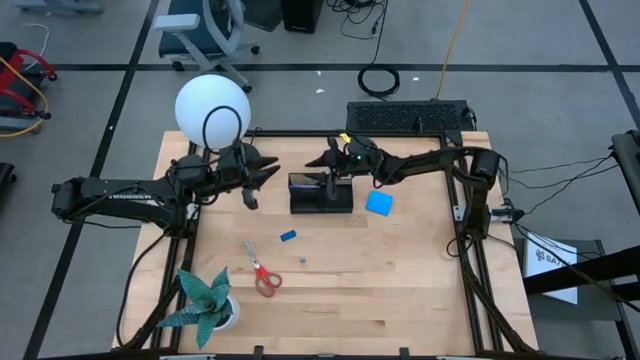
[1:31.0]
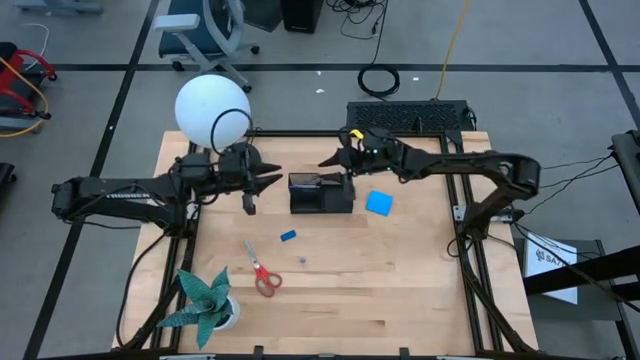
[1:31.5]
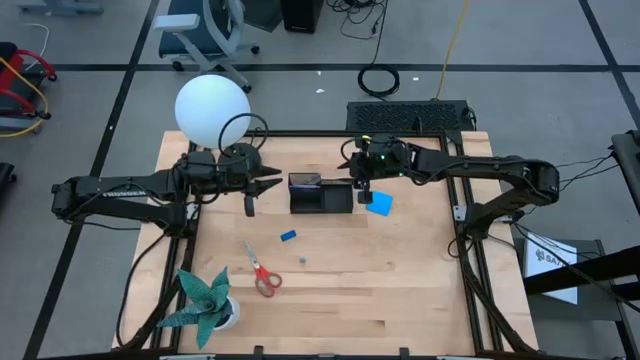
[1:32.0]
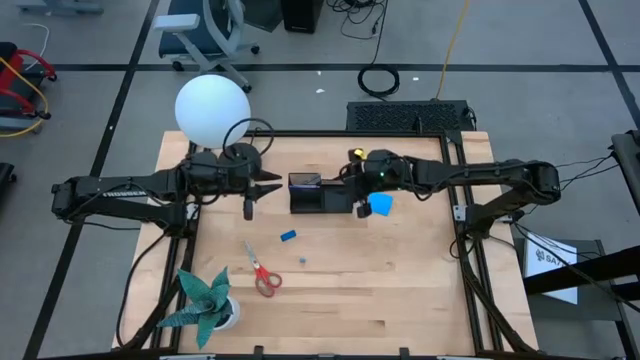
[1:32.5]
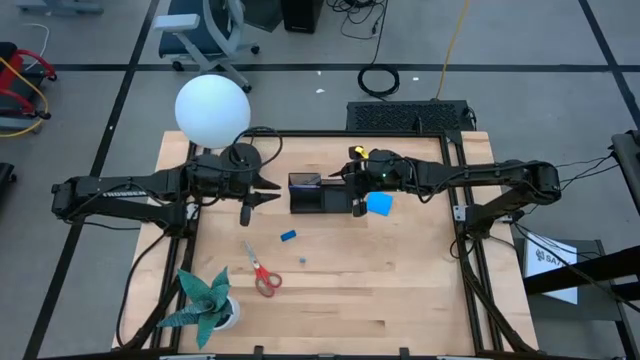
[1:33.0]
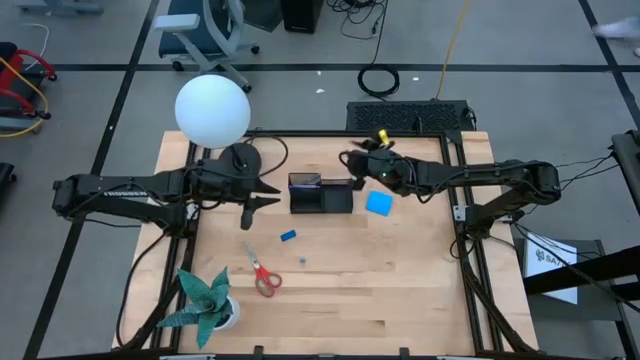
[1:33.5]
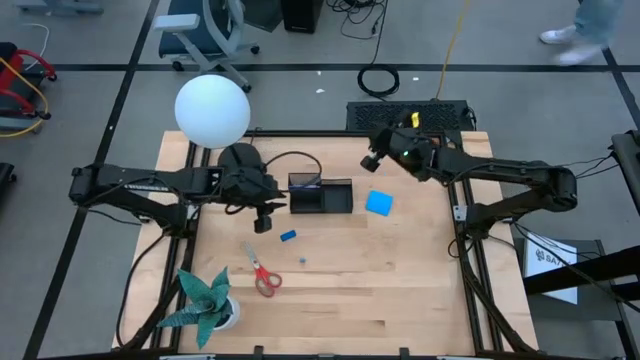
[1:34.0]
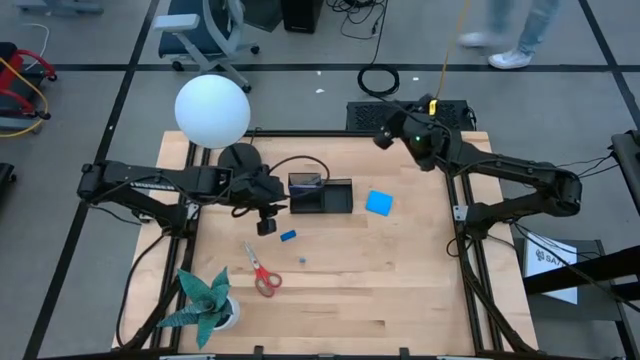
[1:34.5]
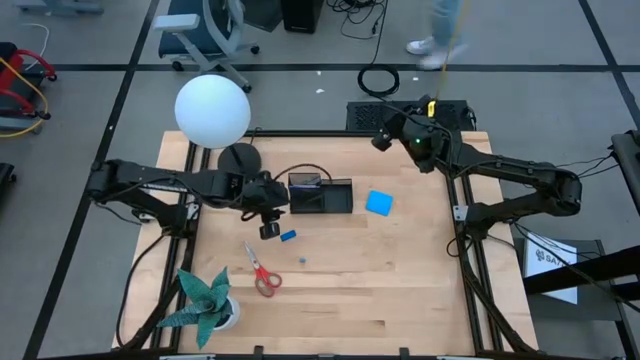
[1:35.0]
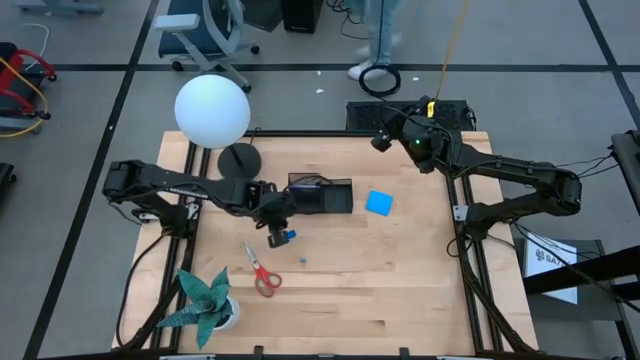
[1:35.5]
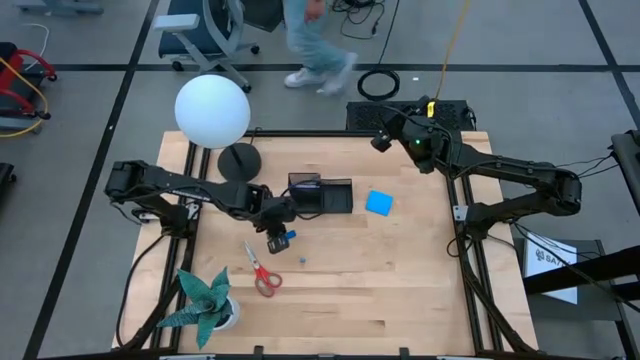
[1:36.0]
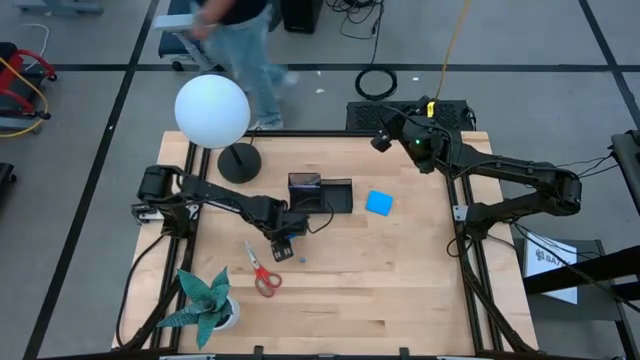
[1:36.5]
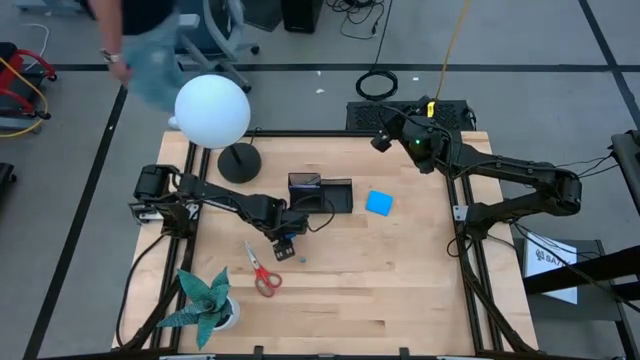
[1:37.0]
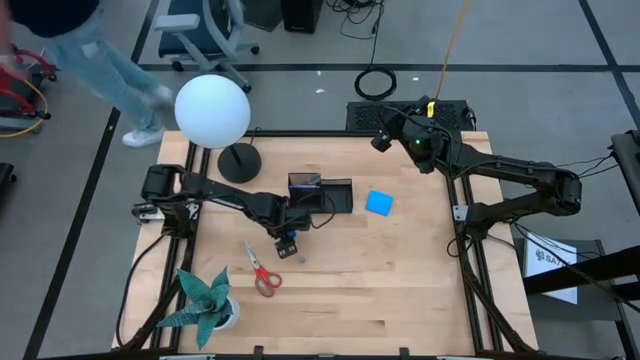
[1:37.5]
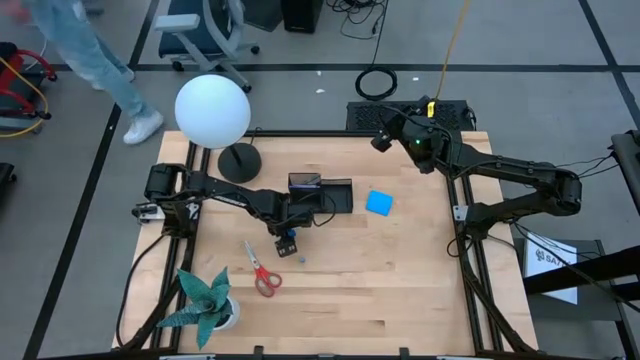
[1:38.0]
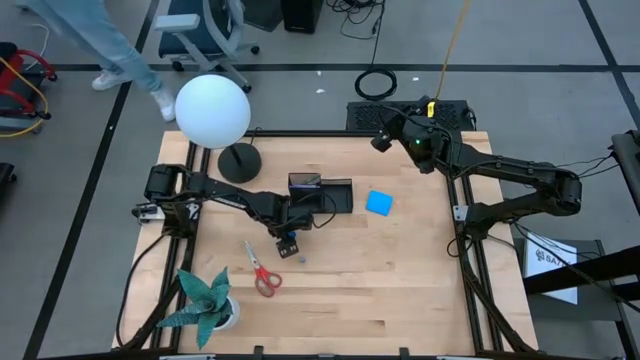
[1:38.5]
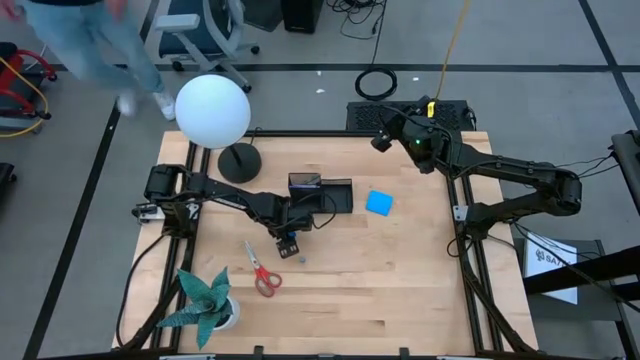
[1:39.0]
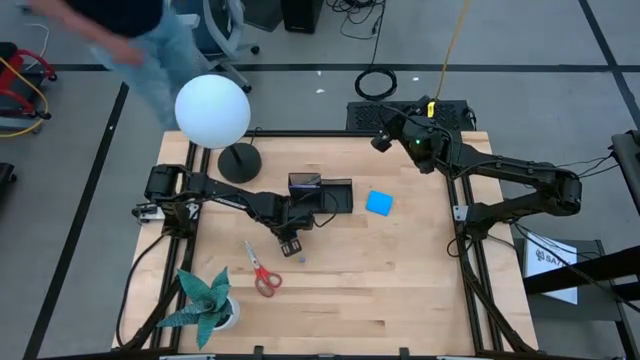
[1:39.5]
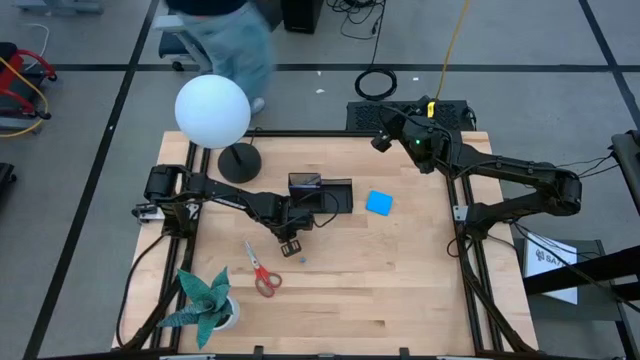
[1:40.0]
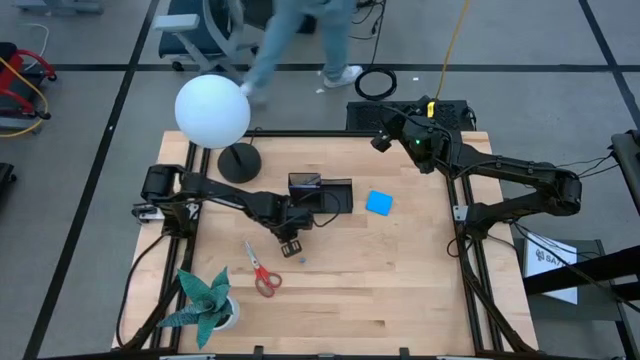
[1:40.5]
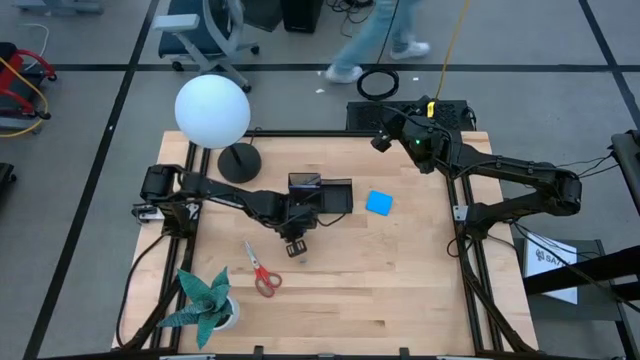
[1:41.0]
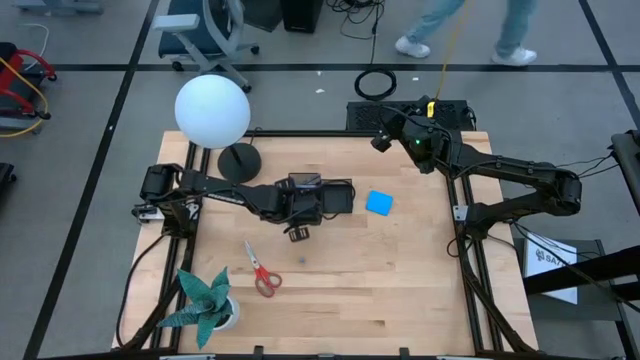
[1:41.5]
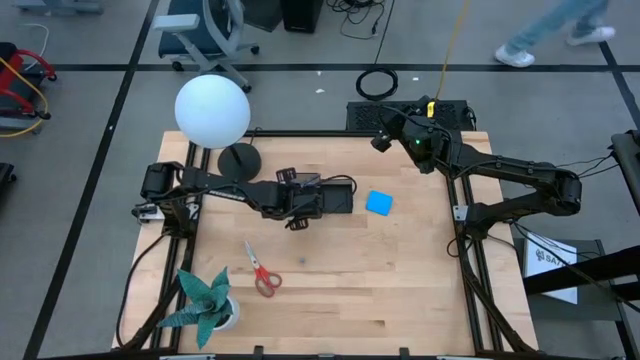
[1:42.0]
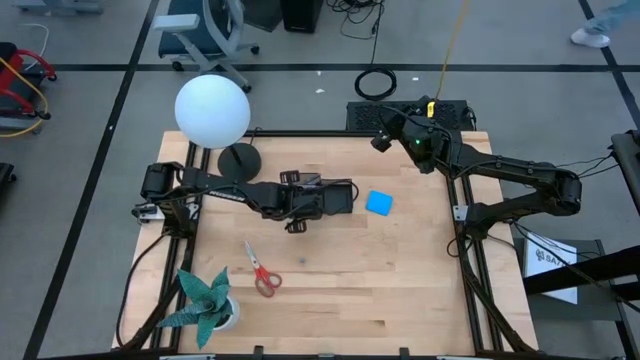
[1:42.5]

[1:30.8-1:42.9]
Task: Pick and place office supplies into organizer
Put the blue eraser into the black desk organizer

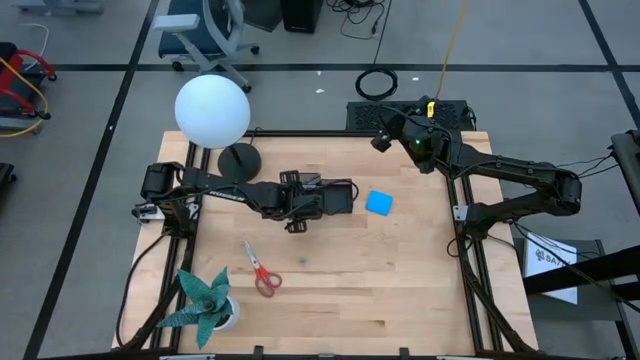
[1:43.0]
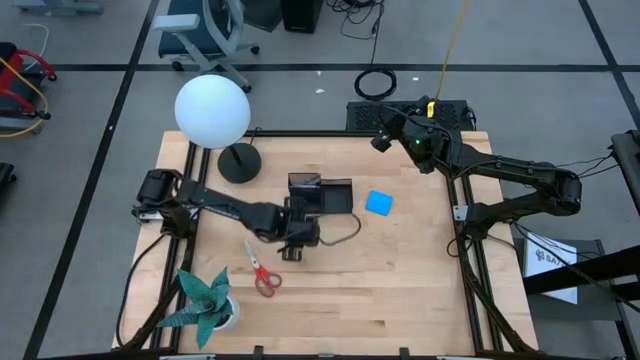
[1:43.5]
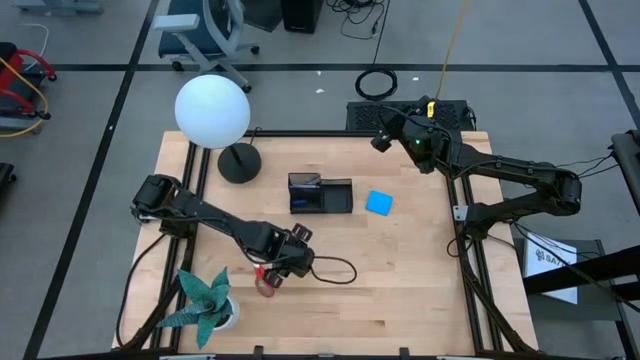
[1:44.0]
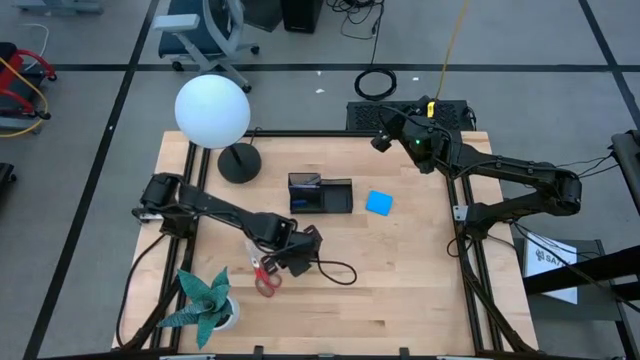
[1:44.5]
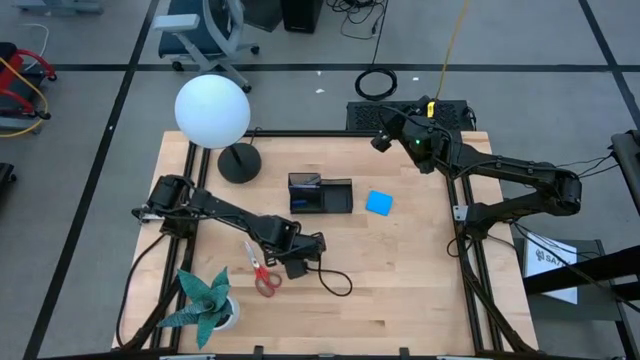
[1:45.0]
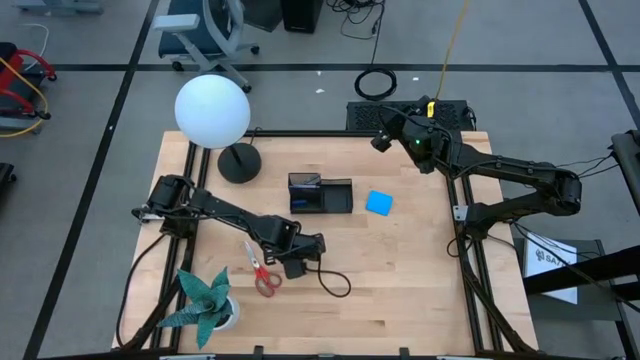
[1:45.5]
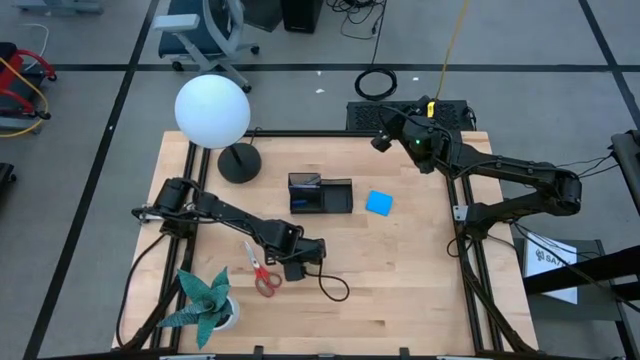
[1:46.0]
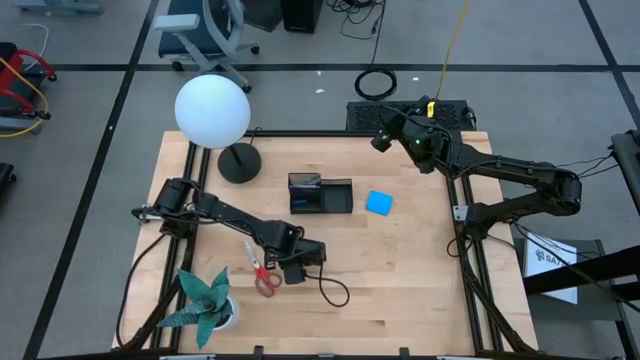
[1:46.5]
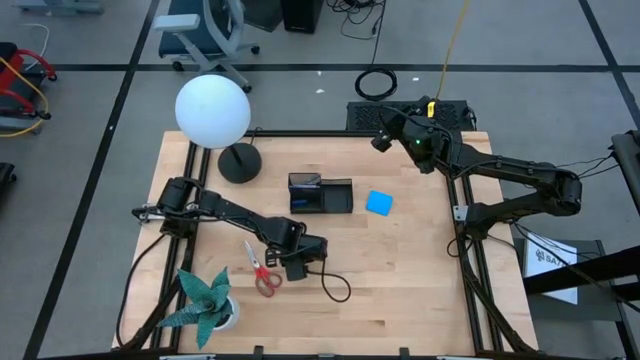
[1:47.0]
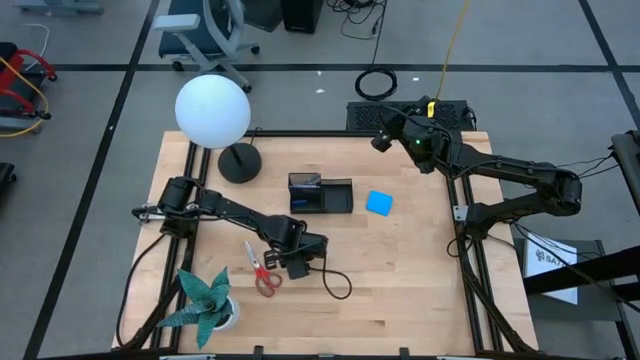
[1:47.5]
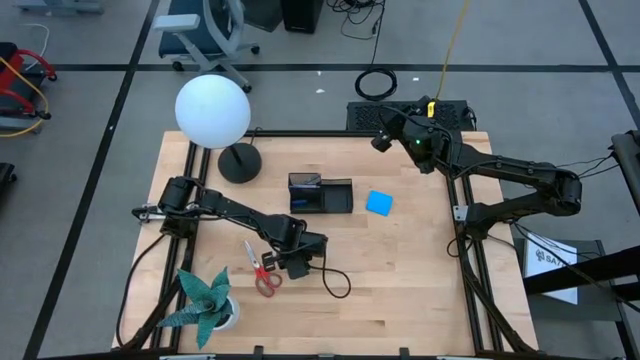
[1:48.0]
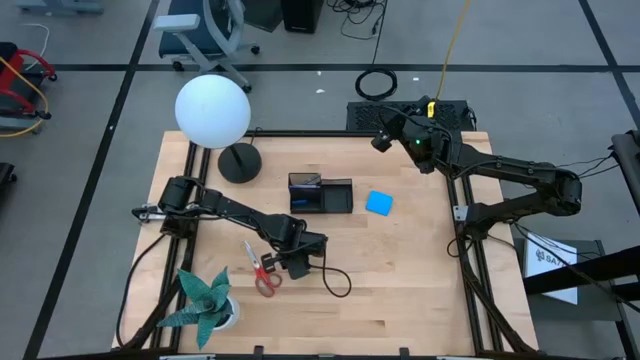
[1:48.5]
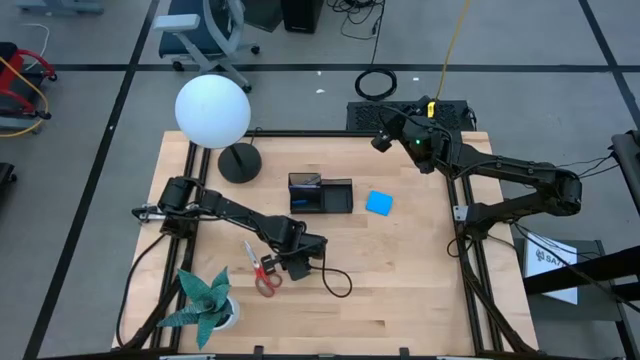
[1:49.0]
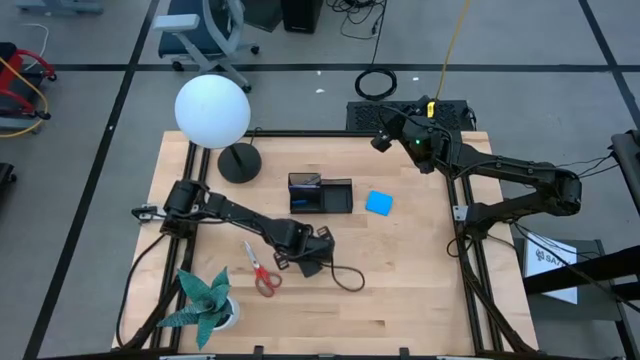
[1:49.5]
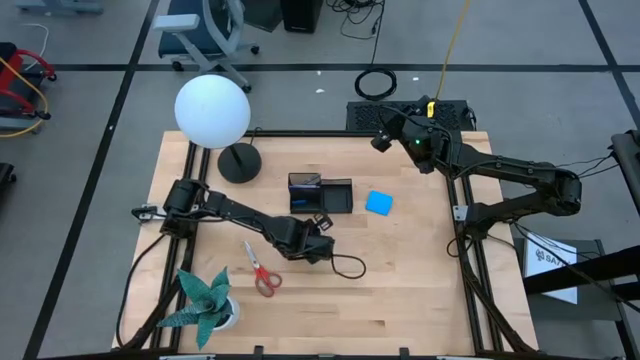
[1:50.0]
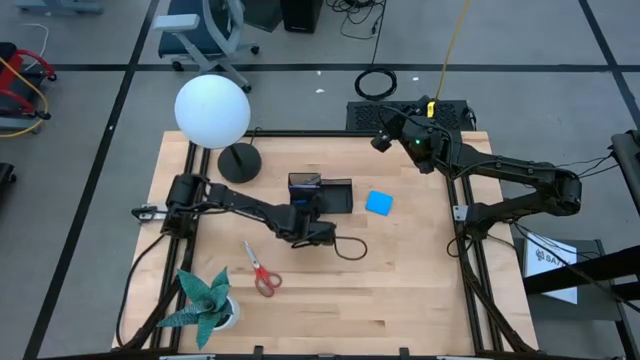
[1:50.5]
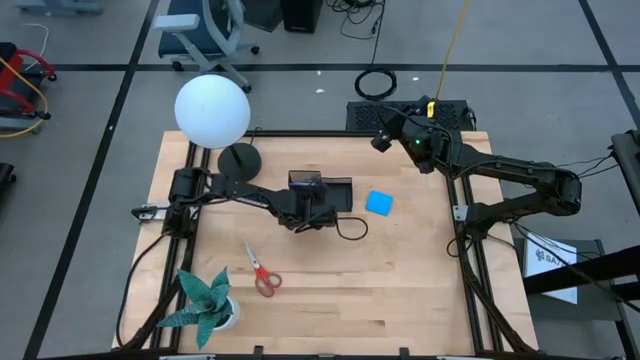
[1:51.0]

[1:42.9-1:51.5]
Put the blue binder clip into the black desk organizer

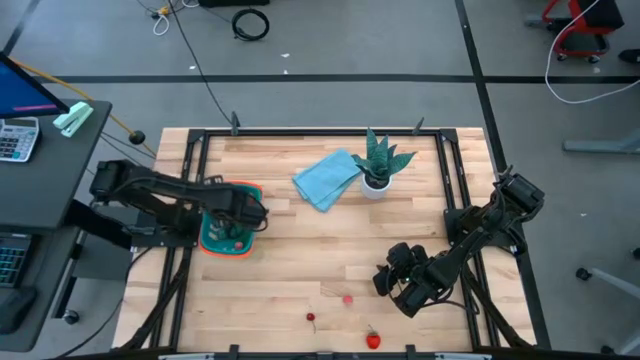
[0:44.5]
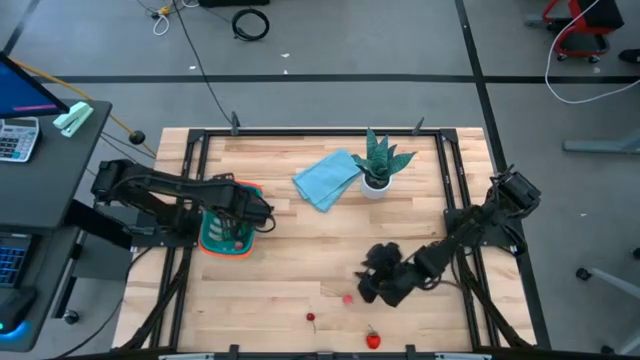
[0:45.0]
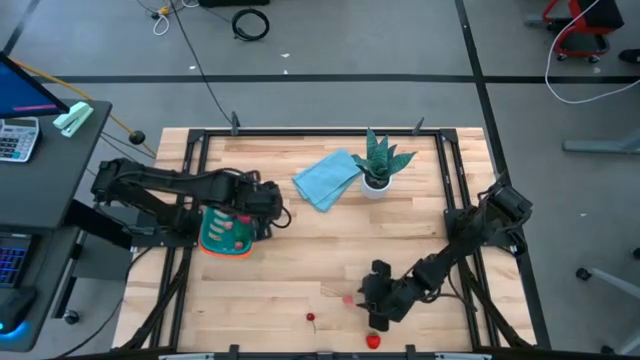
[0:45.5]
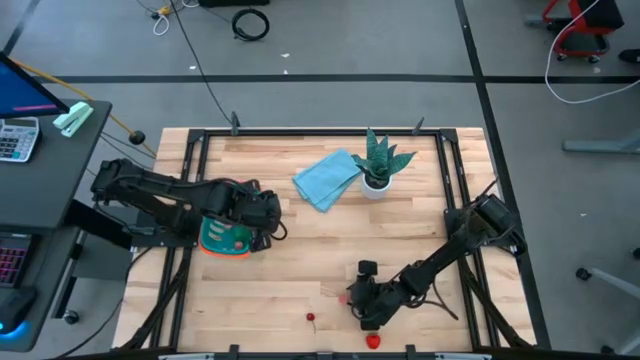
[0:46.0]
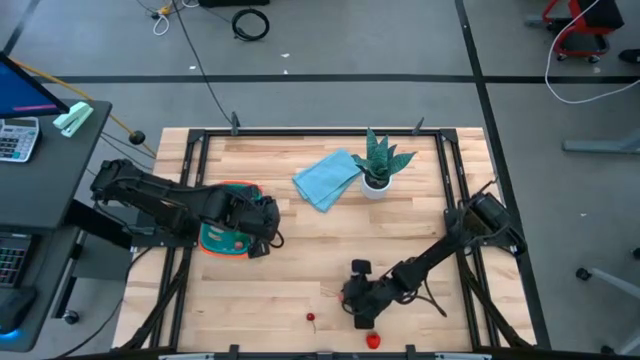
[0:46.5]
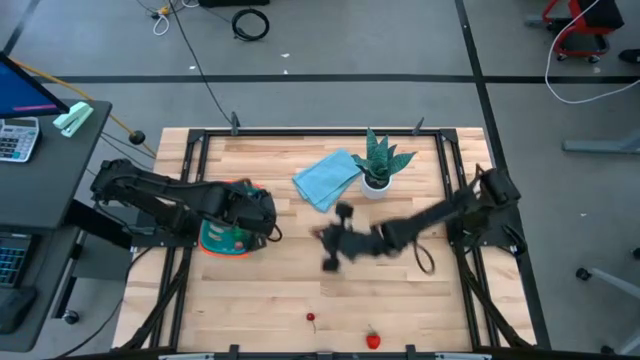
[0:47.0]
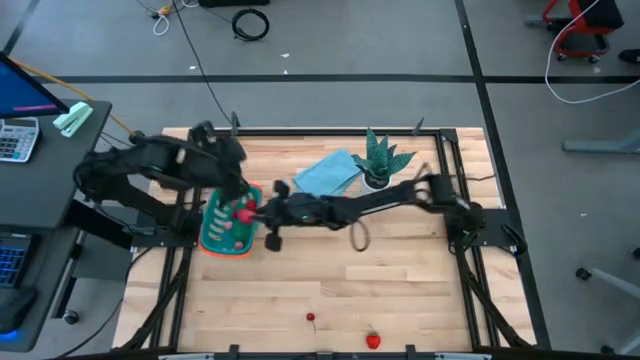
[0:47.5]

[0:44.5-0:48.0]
Task: Pick and placing Produce into tupperware
Put the pink peach into the blue basket
